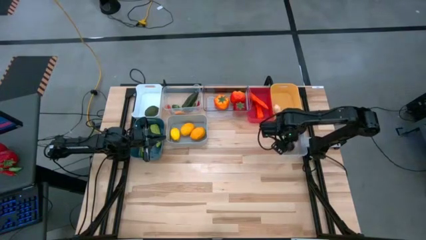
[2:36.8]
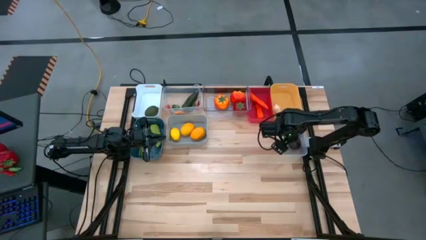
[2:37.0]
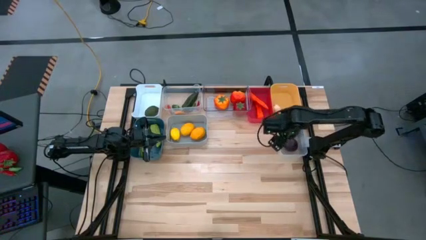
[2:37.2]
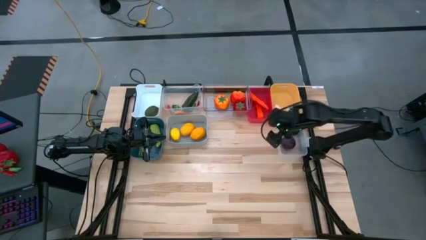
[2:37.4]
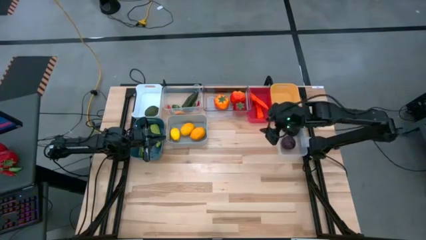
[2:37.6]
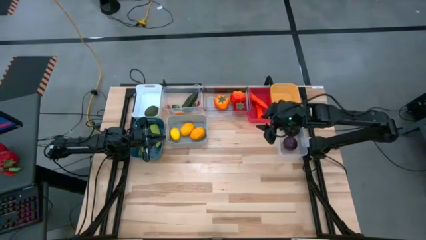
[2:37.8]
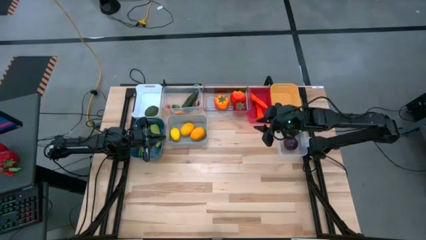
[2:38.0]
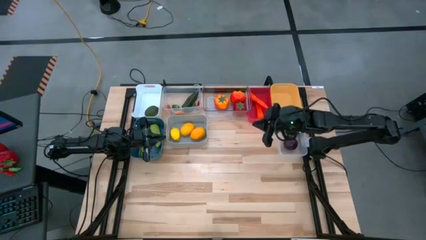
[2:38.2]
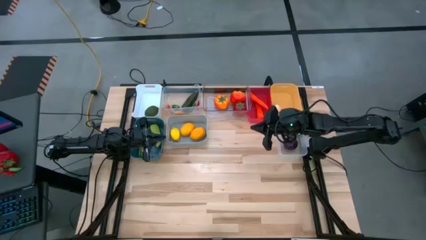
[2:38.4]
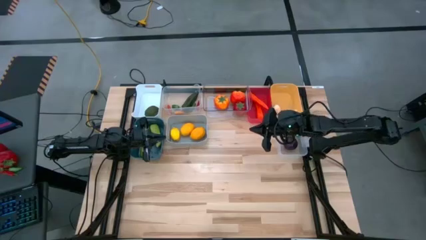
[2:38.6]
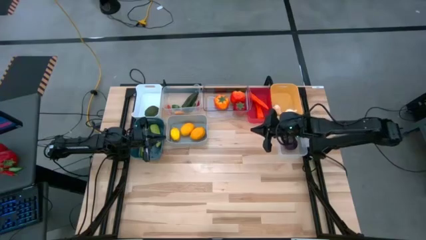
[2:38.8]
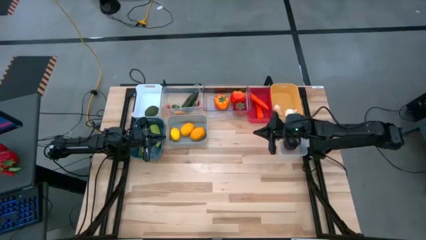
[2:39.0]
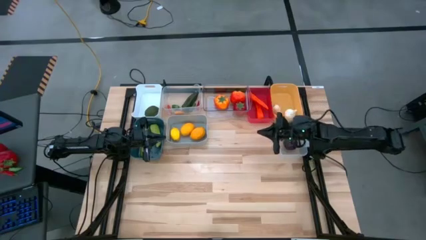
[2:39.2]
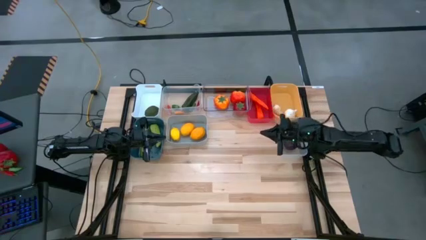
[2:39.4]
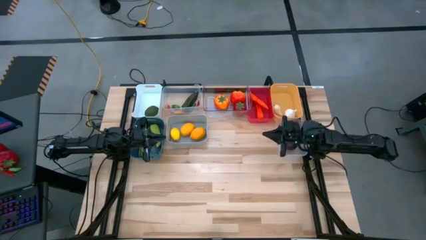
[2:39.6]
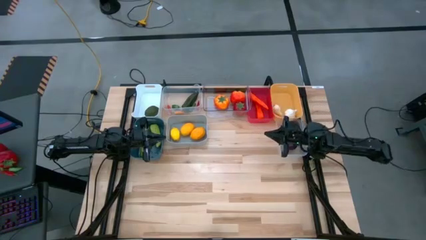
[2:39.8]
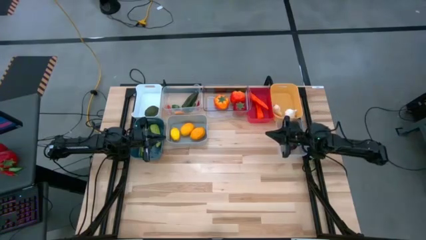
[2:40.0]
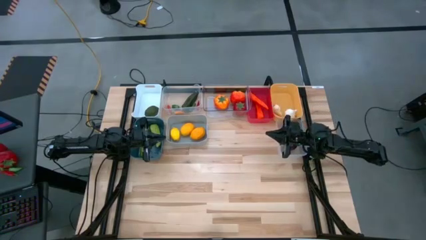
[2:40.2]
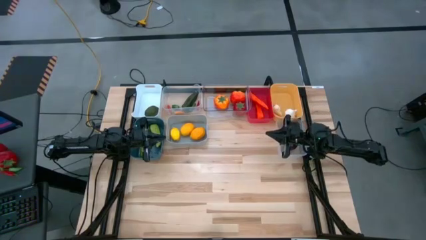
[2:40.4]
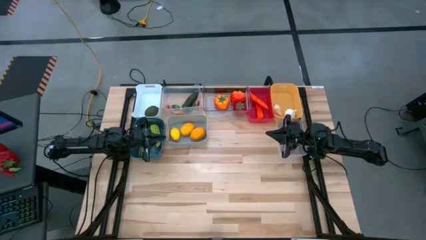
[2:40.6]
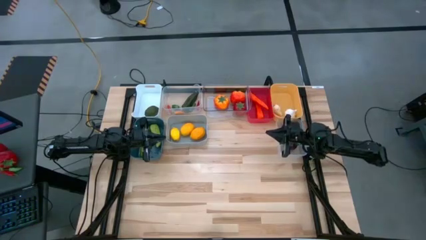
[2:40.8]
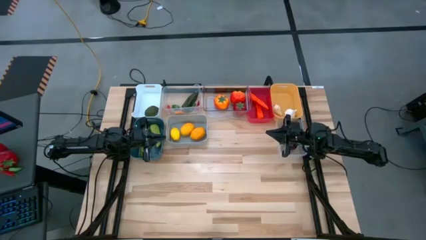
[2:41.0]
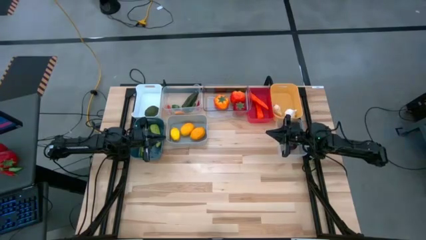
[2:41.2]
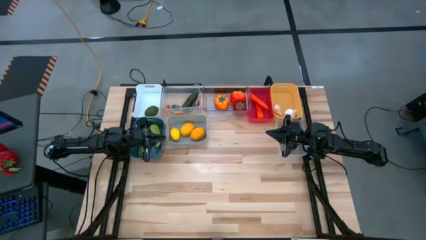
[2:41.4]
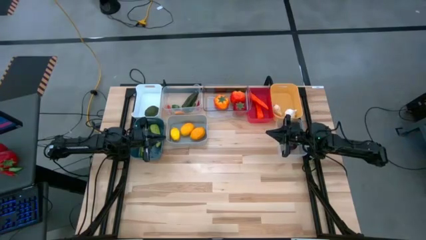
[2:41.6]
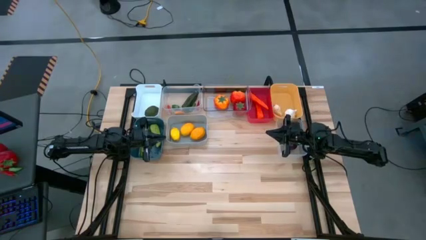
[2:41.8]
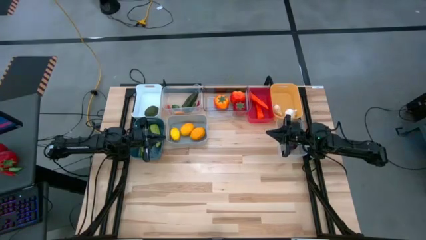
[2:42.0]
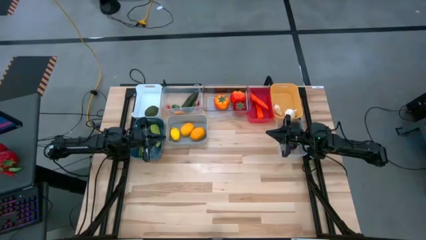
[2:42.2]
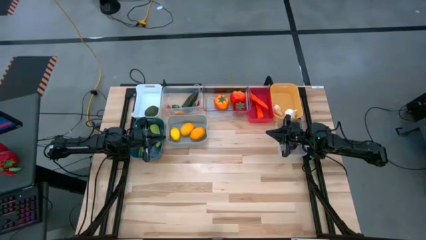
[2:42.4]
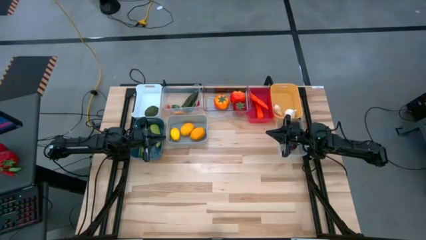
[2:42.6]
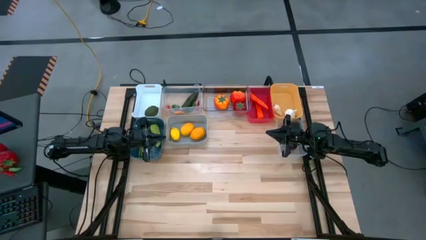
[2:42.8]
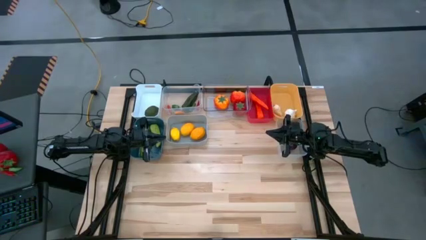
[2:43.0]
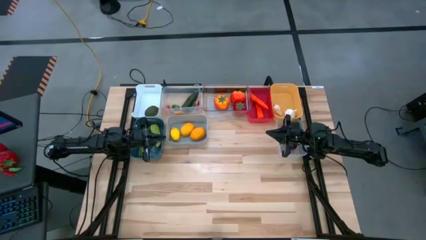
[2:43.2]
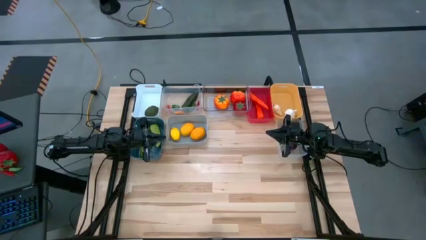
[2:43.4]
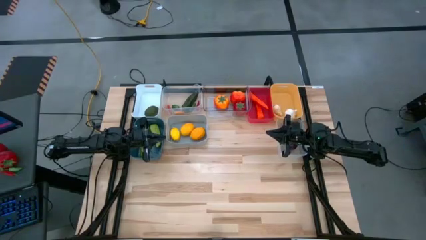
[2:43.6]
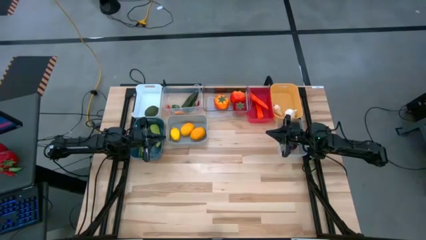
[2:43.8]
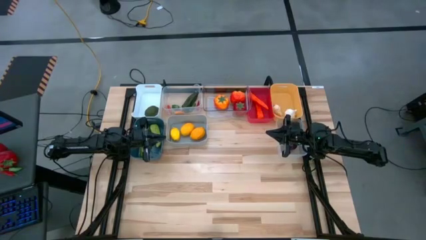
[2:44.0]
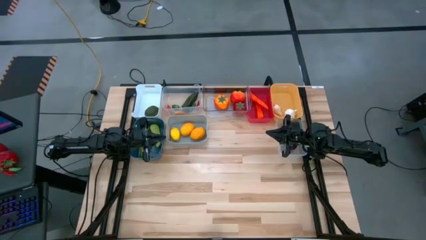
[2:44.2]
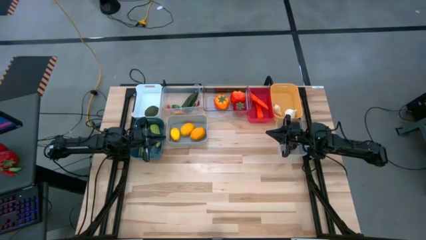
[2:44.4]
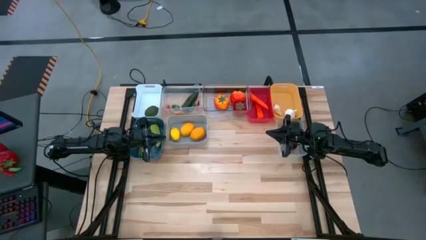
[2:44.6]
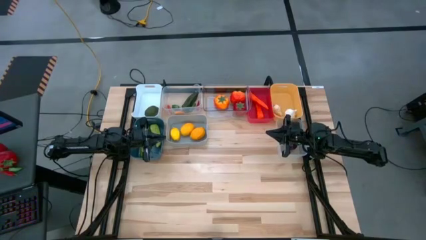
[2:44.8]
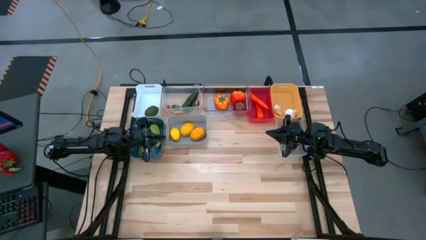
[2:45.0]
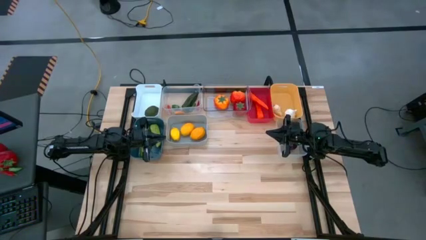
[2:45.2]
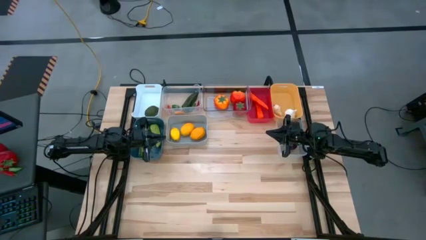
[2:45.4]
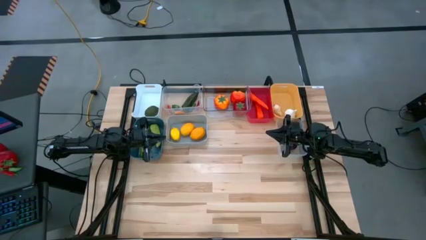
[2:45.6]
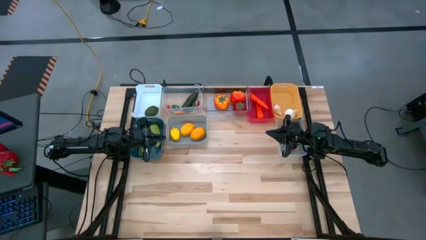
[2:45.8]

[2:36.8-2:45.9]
Task: Sort produce into baskets
Return to Home Position

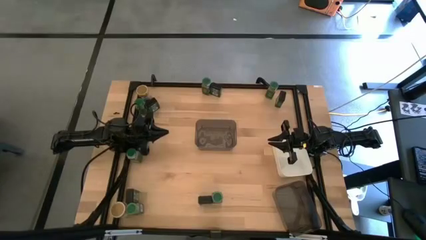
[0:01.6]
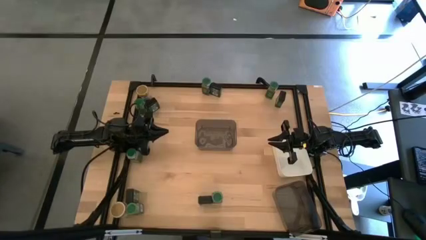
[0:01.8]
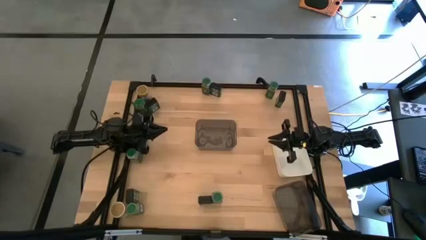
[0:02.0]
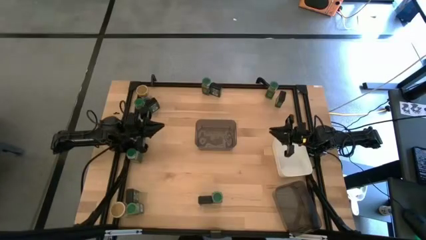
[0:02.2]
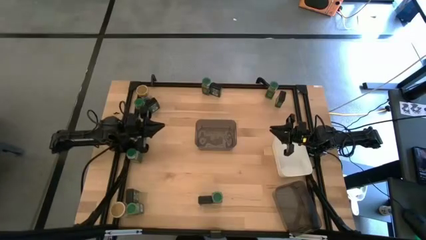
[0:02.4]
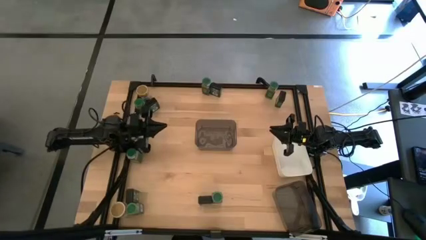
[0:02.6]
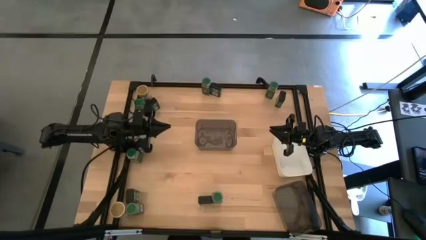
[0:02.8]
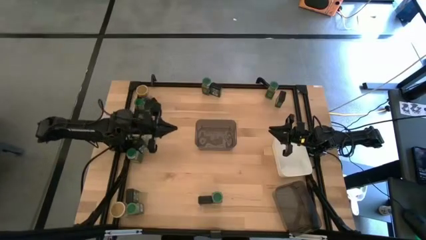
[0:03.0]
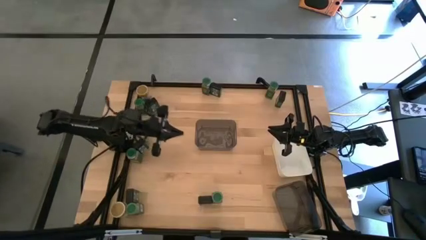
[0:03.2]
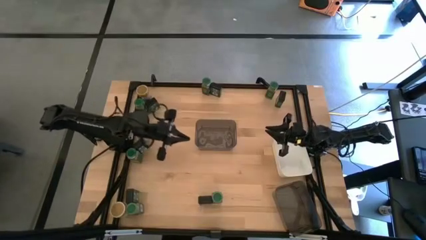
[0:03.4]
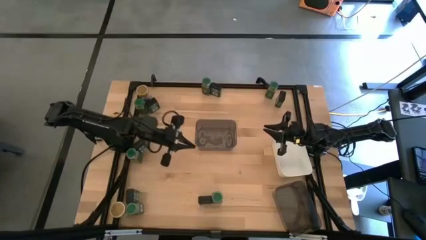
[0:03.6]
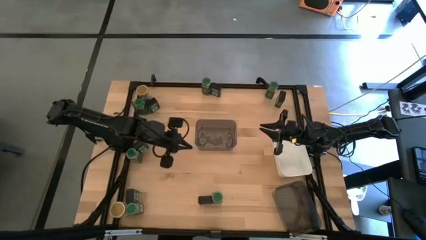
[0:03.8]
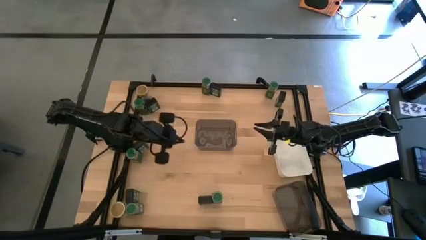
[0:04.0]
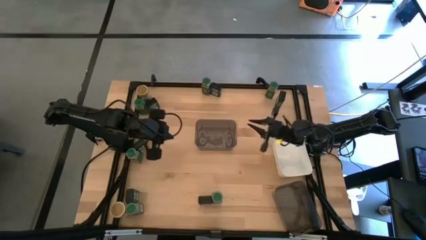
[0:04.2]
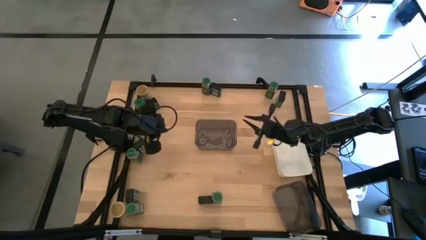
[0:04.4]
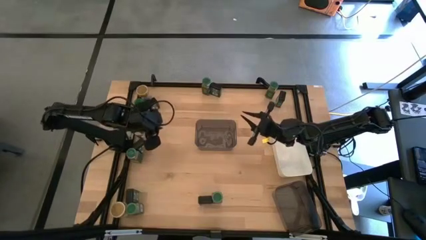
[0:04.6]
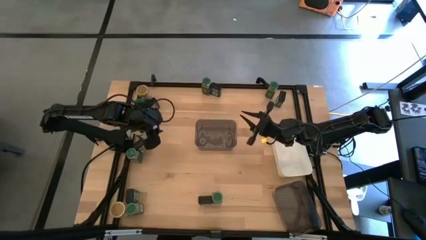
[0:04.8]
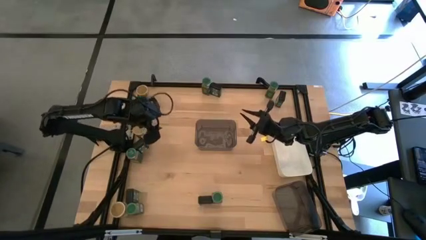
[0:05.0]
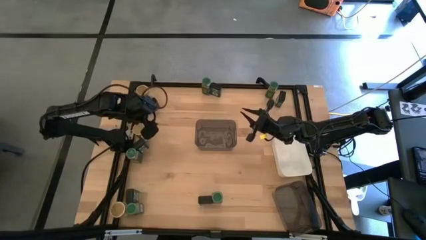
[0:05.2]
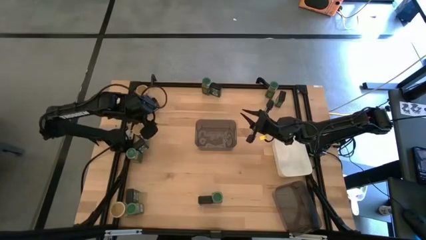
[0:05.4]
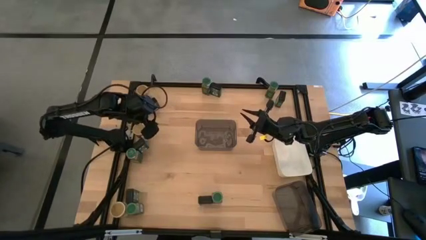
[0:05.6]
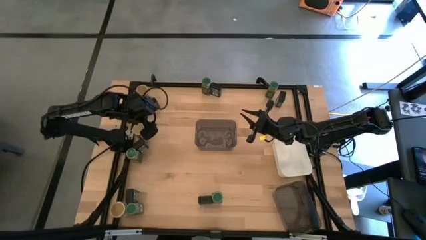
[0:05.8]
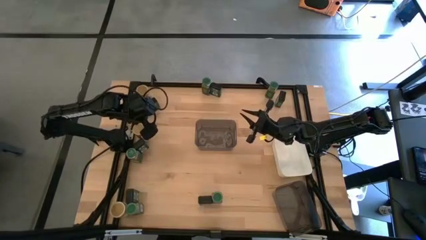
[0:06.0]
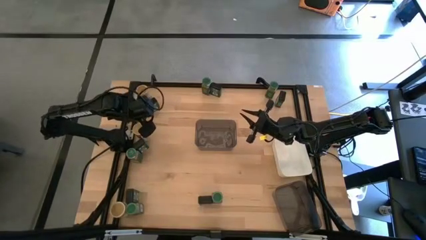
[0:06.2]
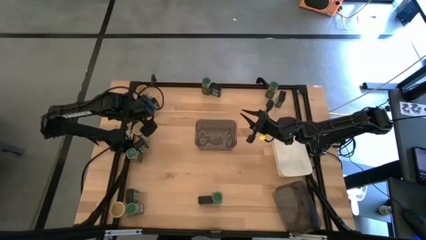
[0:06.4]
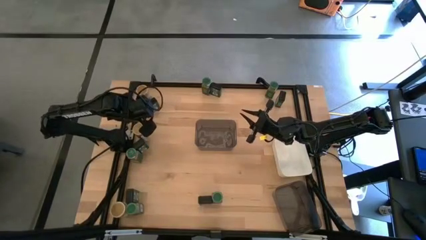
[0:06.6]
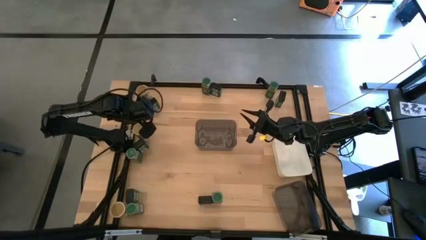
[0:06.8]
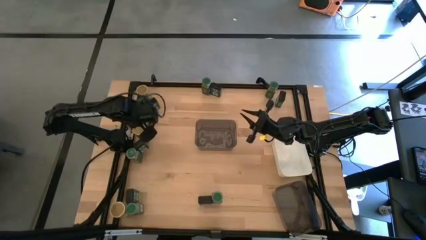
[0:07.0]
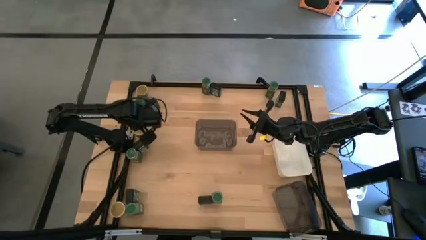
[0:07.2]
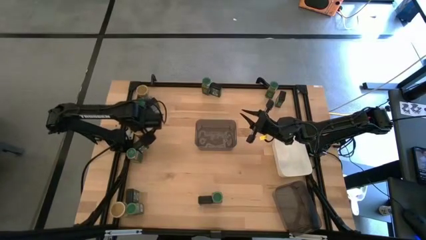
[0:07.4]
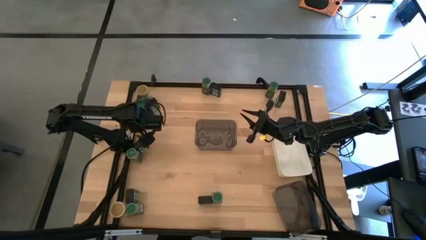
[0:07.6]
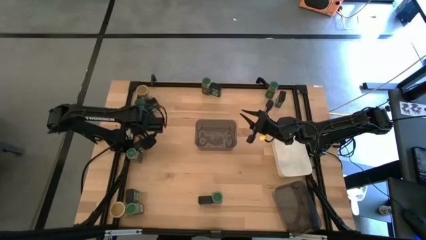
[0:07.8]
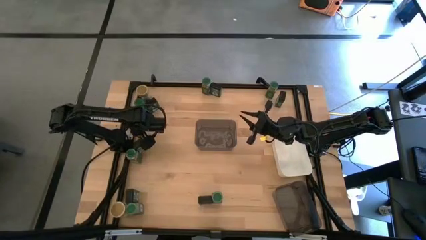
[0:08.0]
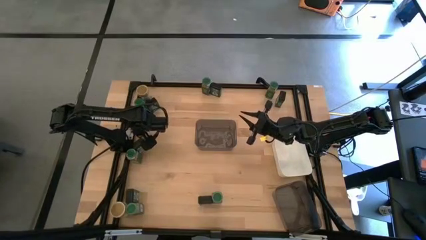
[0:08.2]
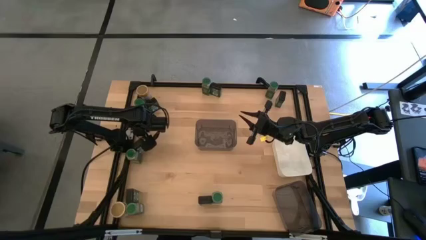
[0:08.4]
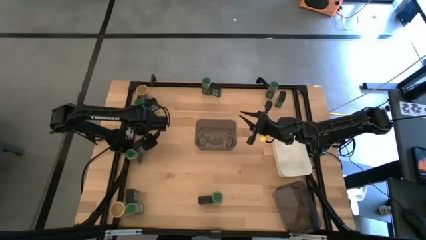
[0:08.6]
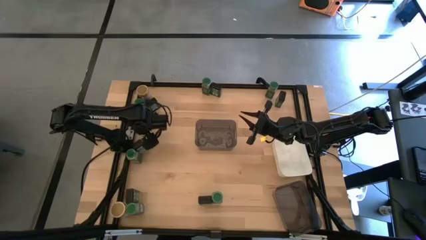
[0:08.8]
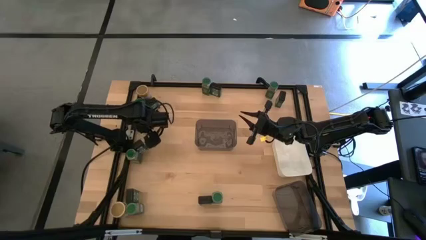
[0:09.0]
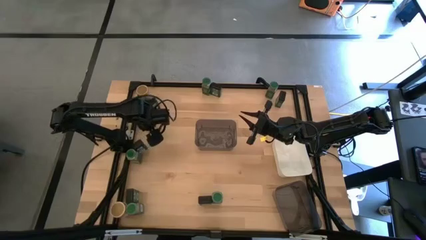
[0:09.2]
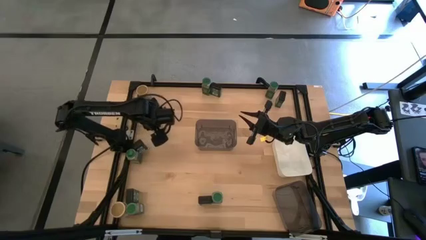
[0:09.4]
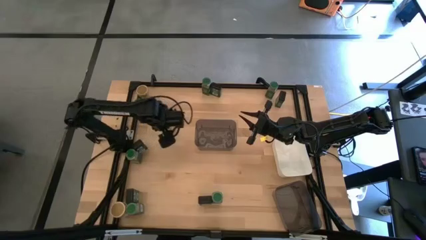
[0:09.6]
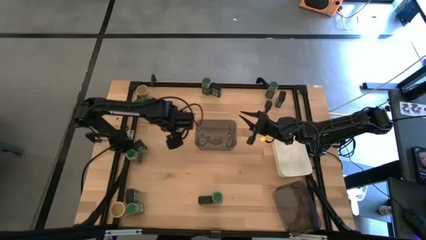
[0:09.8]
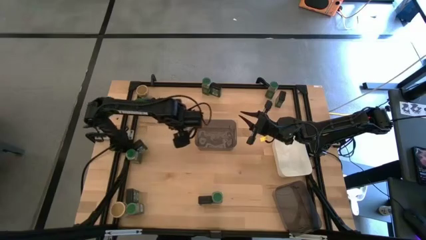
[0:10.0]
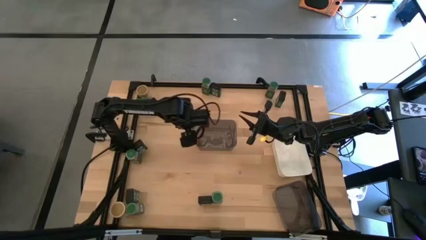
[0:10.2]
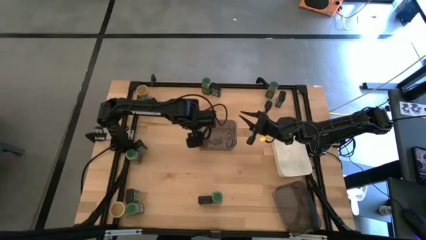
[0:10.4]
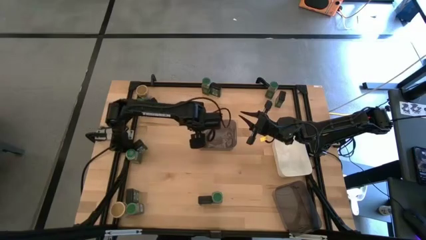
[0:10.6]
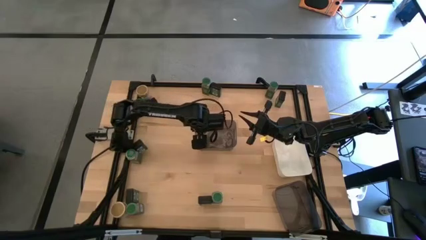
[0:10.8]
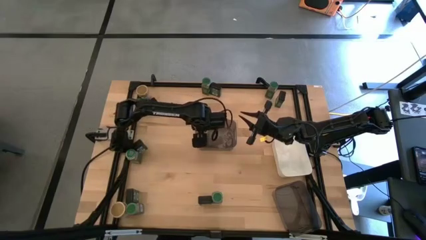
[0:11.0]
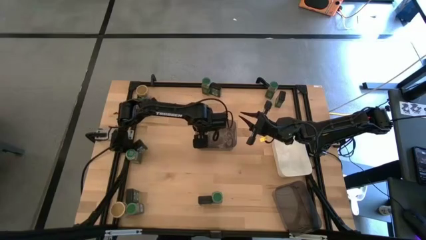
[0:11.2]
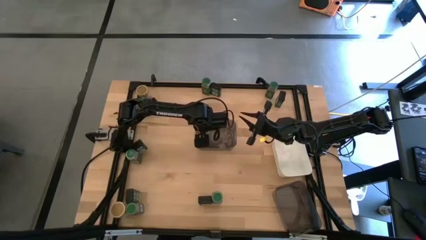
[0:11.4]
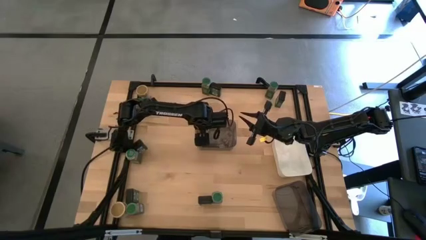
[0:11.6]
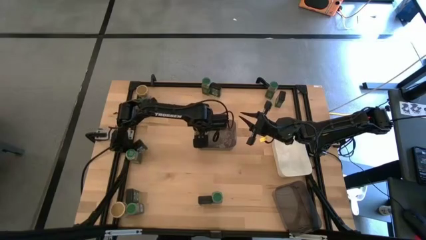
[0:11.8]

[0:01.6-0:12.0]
Task: Sort spices by type
Put the center brown seasoning bottle into the top black bin
